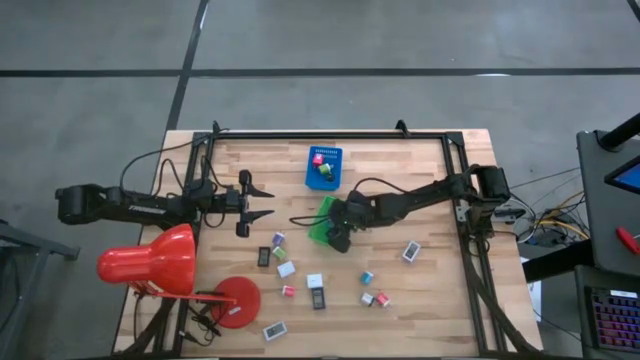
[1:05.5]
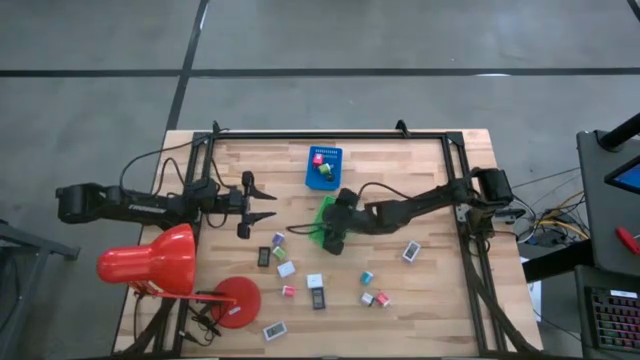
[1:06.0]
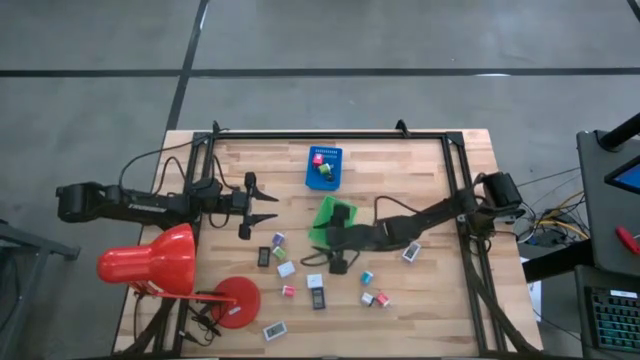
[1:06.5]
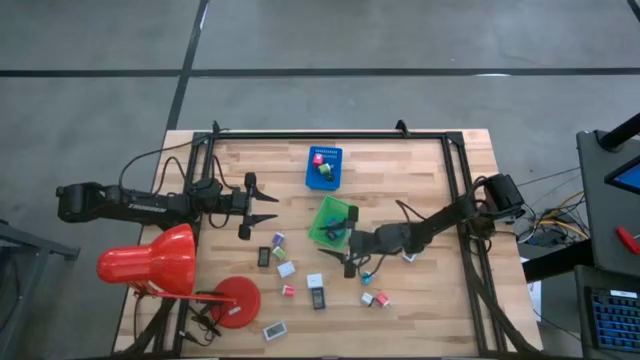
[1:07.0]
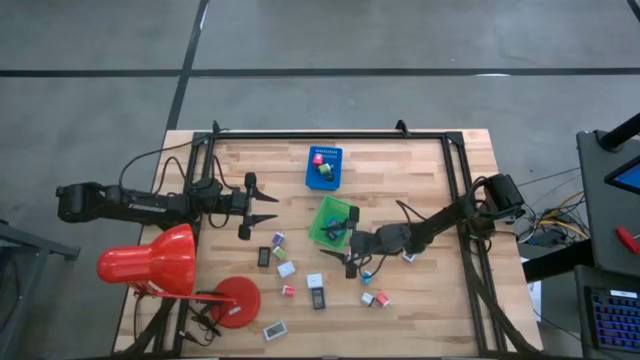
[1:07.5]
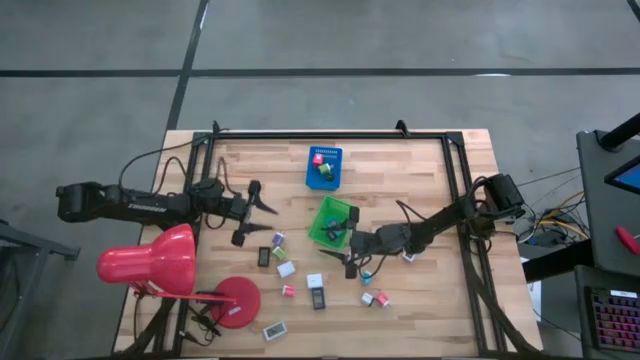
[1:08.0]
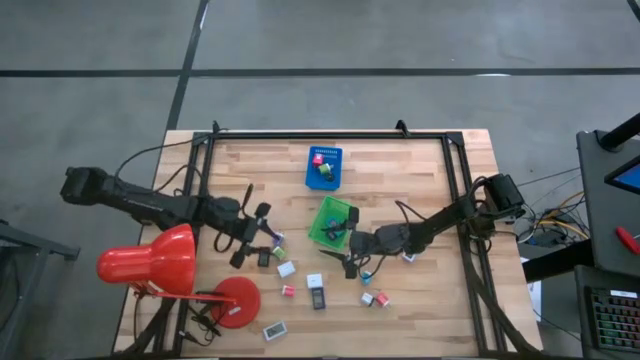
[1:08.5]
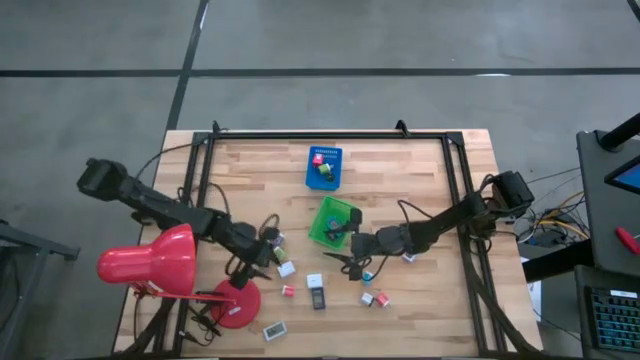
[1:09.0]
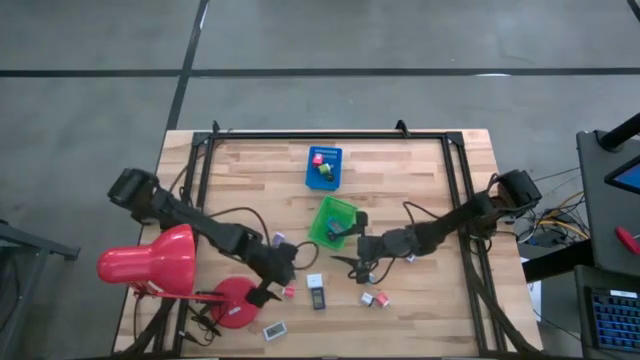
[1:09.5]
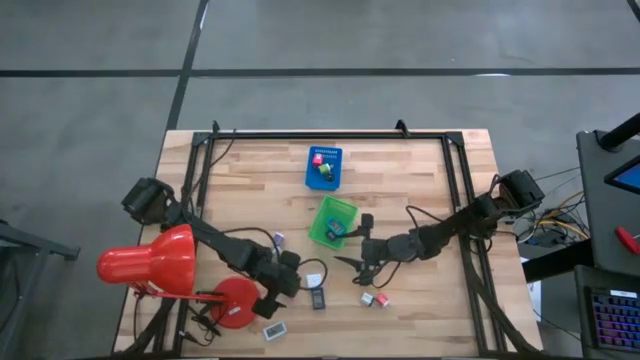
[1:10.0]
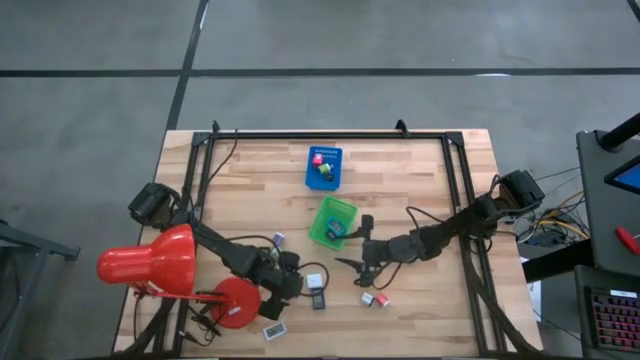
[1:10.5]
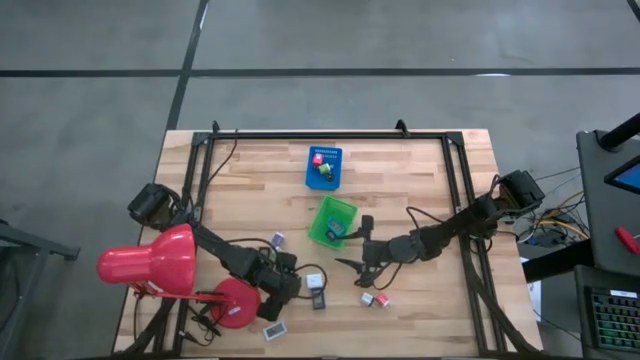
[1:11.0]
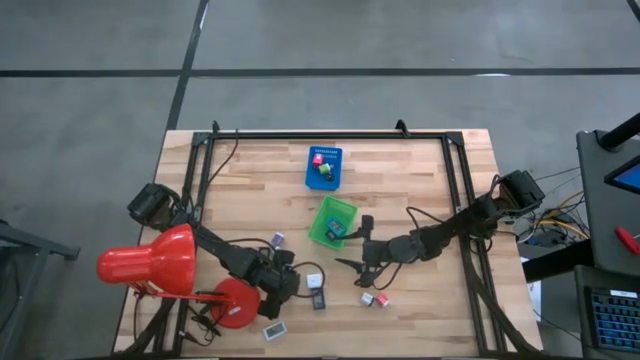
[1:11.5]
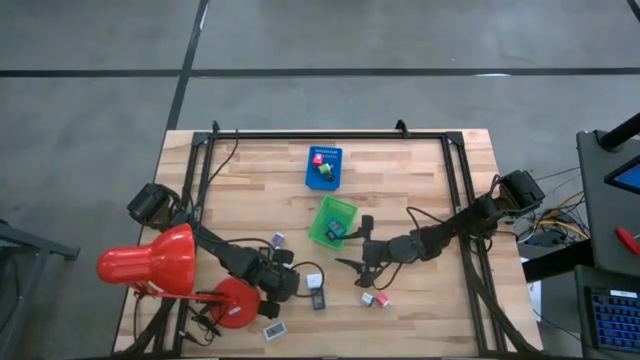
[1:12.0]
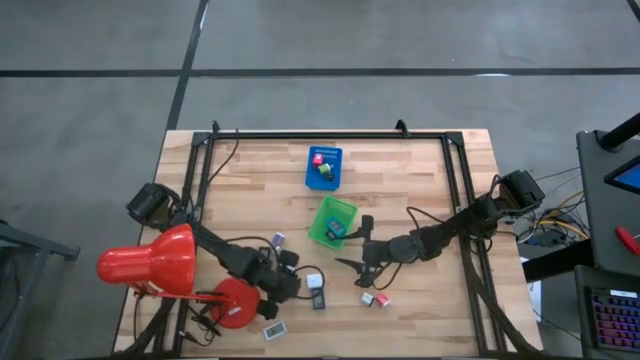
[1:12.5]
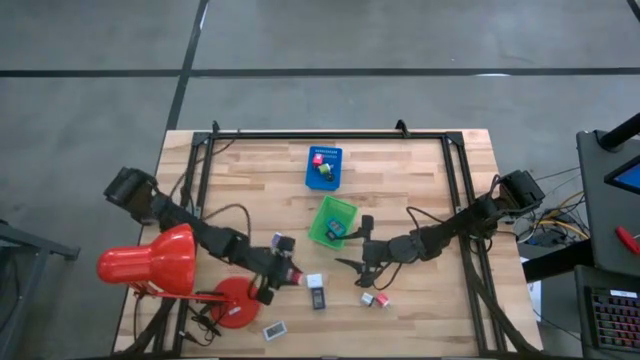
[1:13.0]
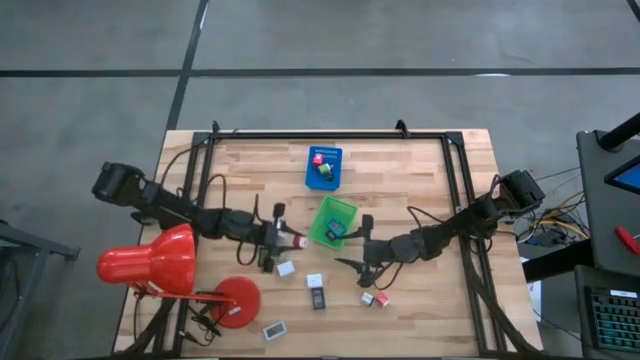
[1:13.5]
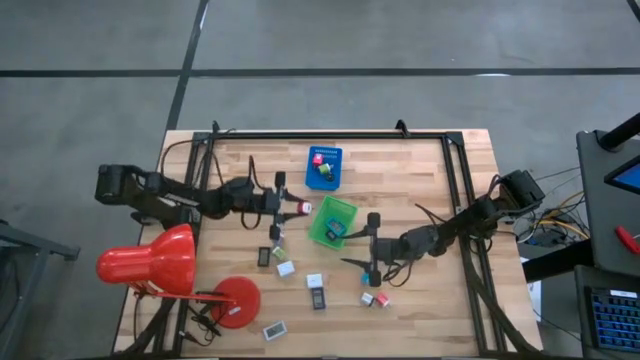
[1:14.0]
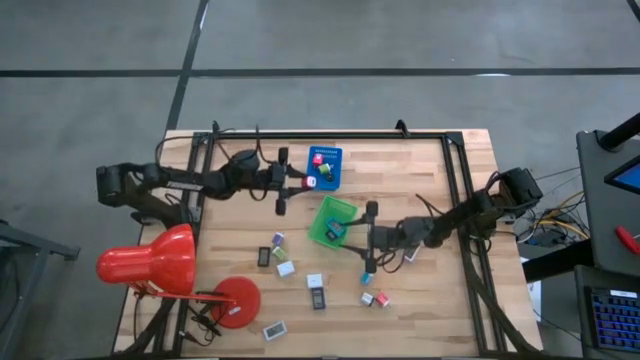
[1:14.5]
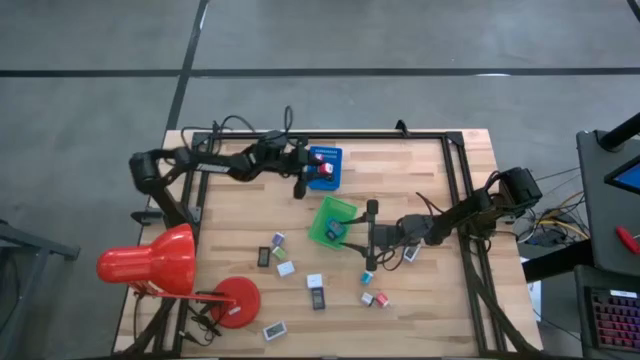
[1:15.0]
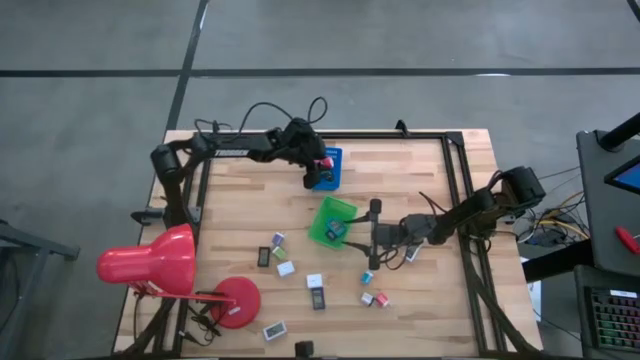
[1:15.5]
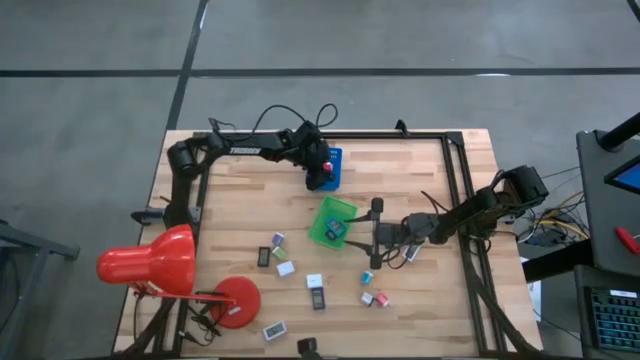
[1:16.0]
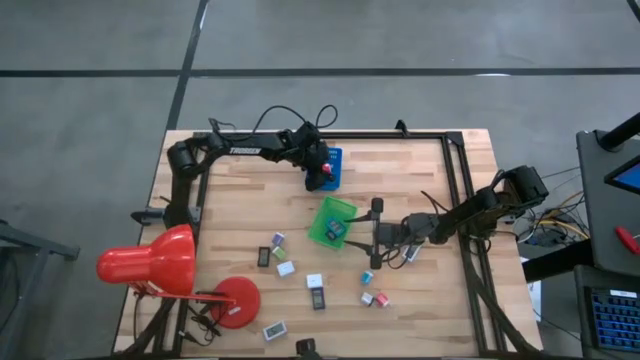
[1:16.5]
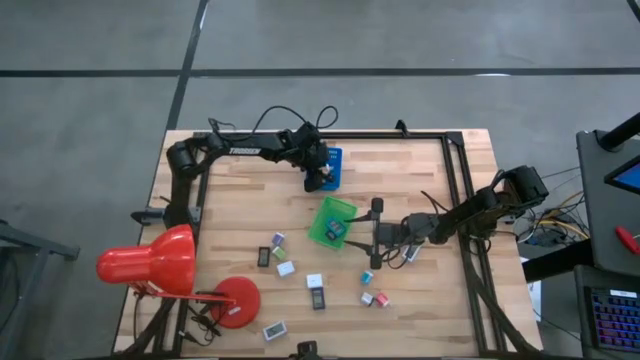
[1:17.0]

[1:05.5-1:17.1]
Task: Pick & Place Office items
Put the left small red charger adapter into the blue bin

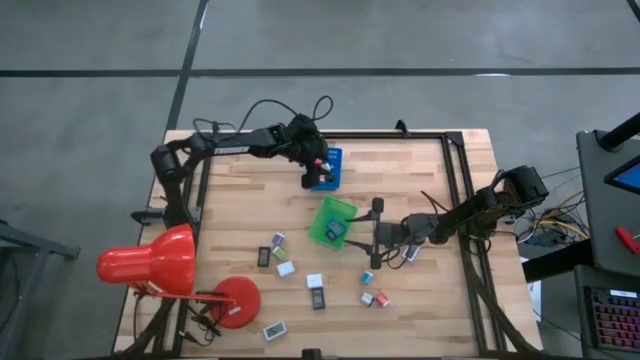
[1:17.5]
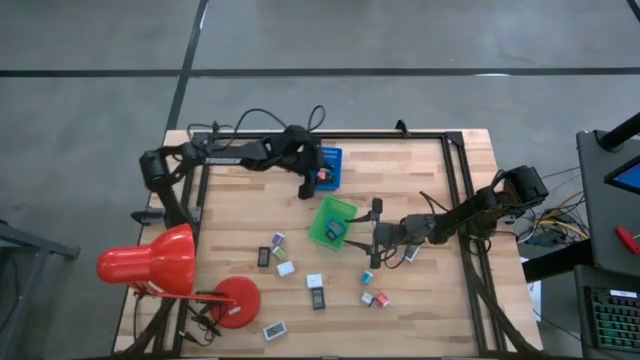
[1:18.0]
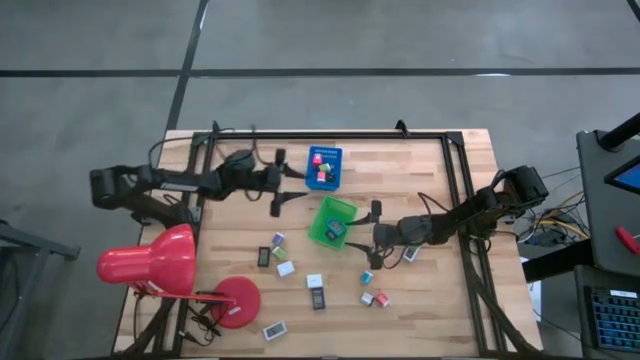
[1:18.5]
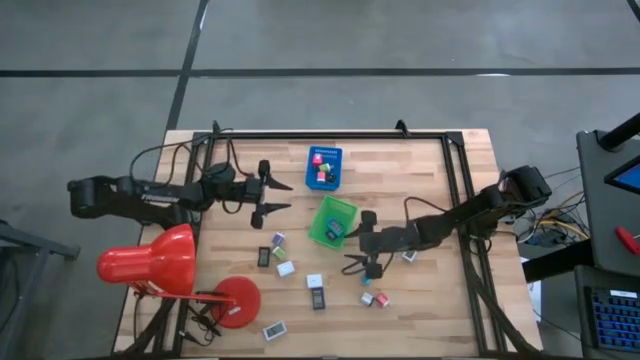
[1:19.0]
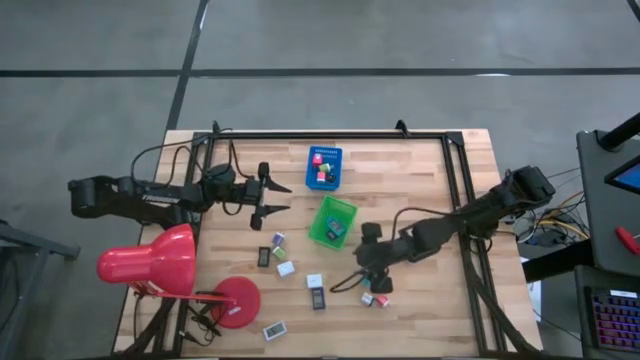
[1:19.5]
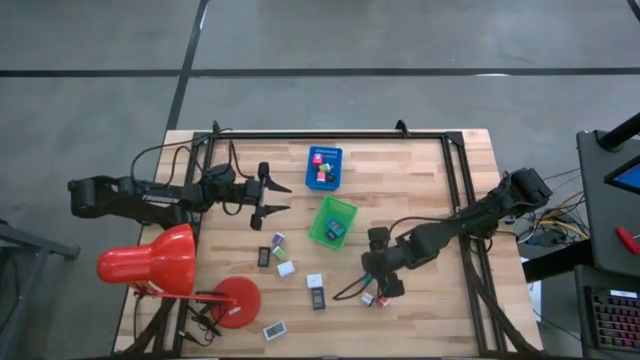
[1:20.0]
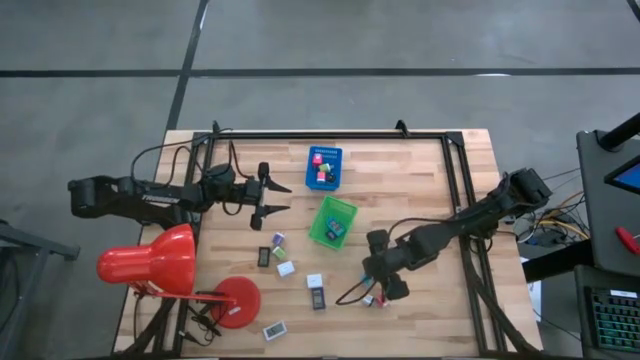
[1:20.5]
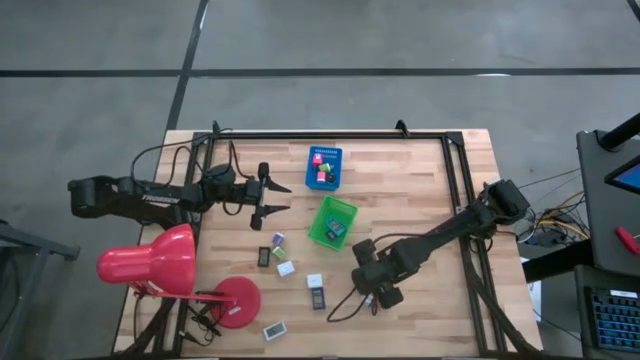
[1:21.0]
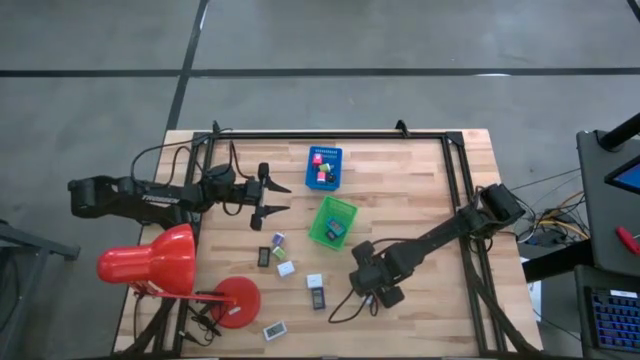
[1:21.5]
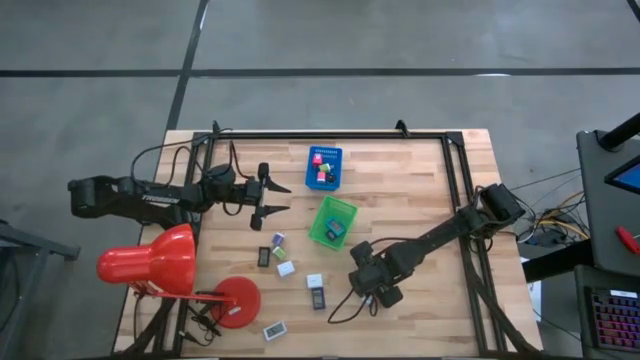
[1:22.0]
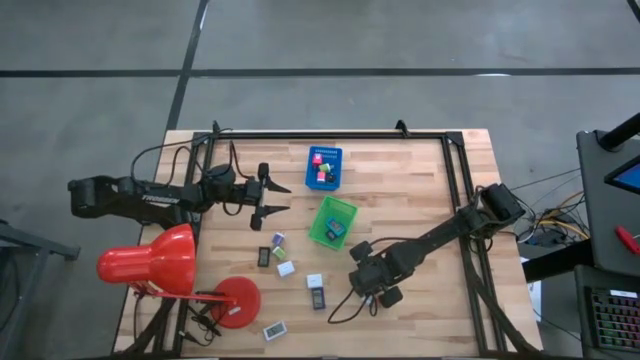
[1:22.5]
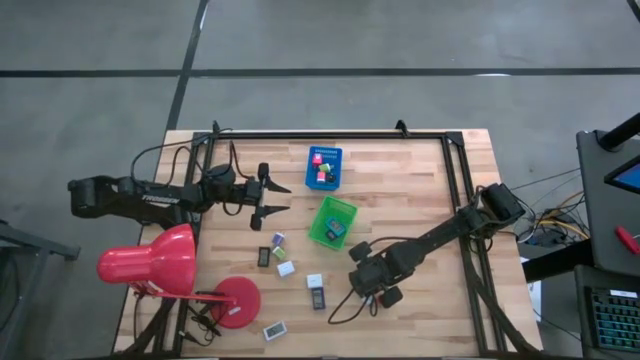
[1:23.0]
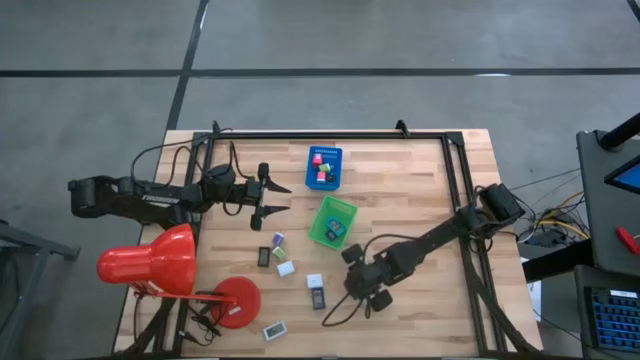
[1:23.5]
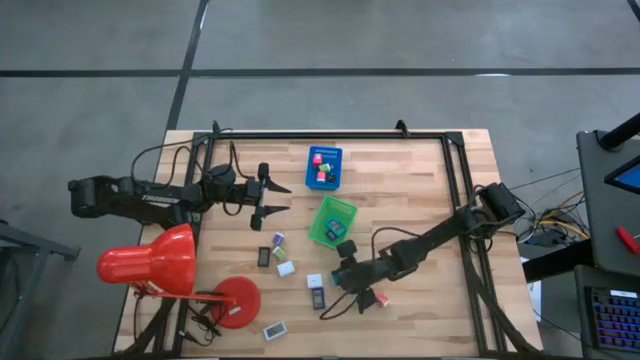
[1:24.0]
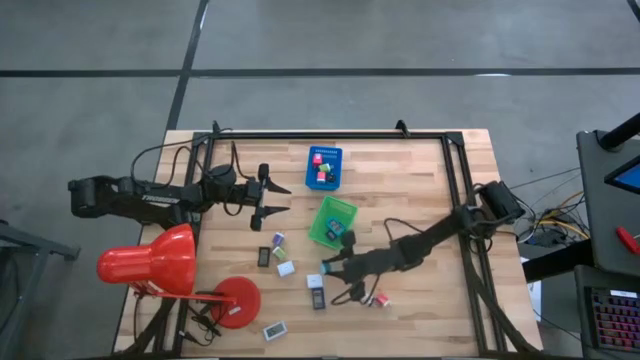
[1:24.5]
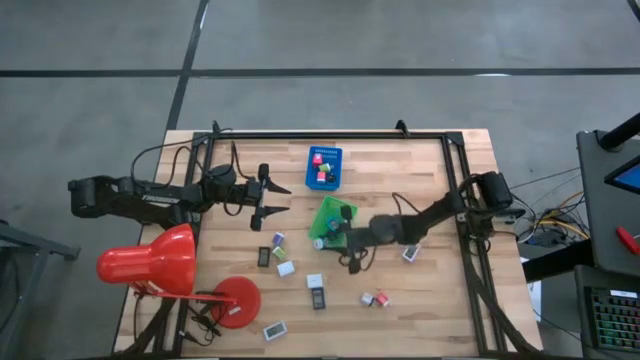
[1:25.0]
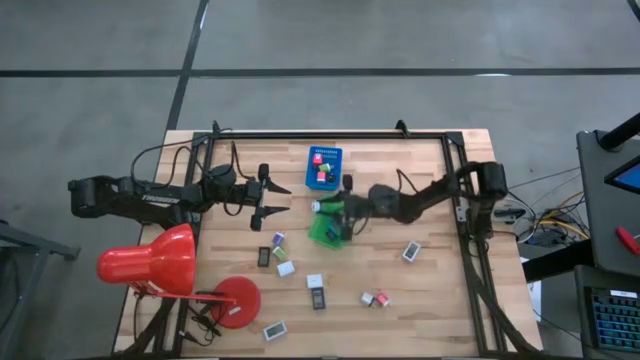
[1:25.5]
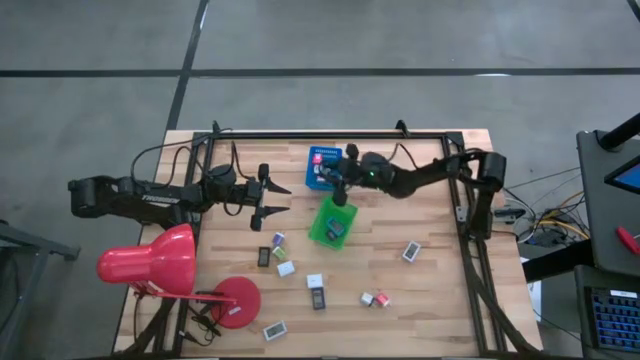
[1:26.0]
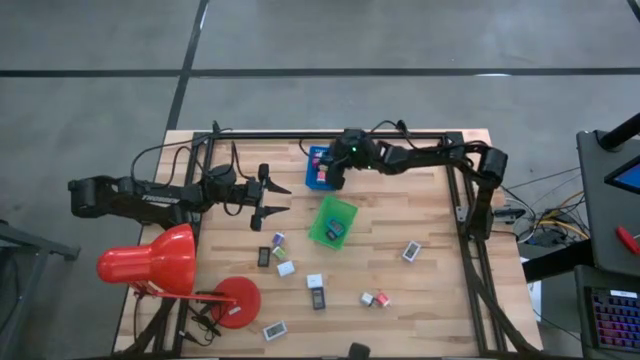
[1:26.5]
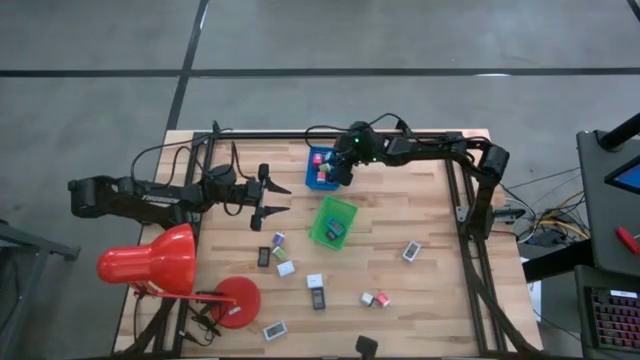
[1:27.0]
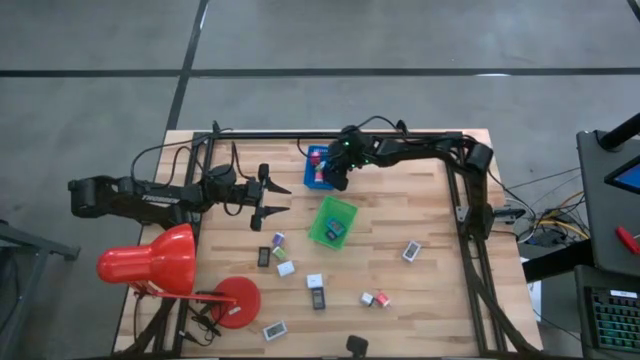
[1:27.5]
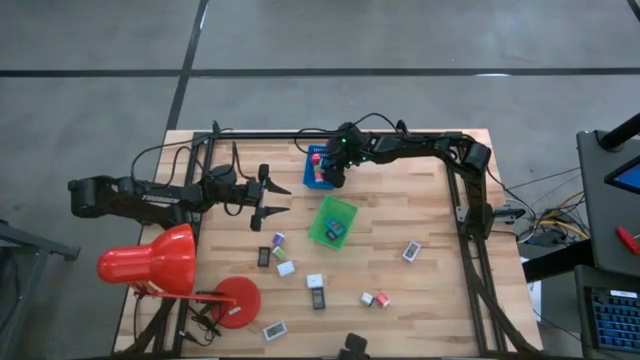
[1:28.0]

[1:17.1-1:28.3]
Put the small light blue charger adapter into the blue bin
